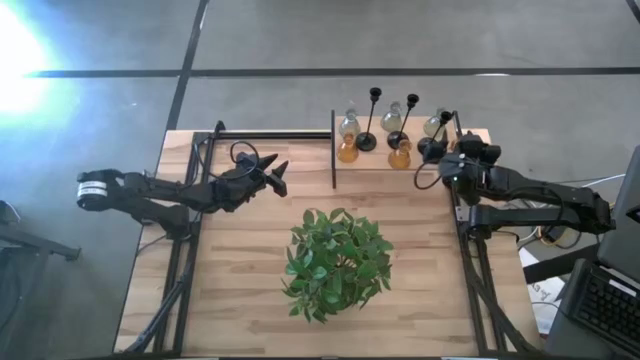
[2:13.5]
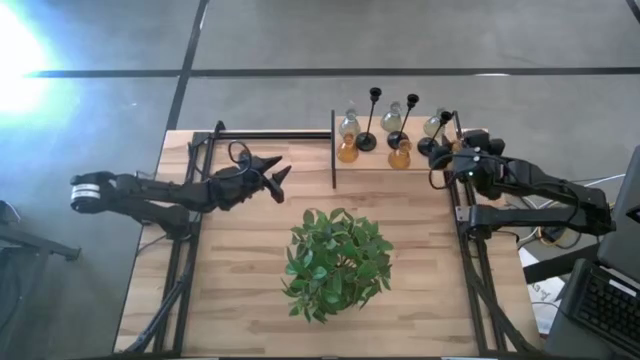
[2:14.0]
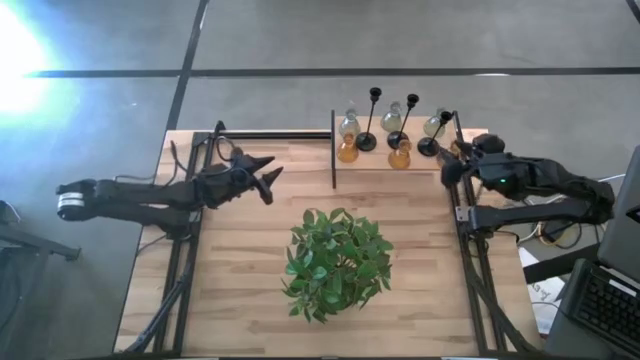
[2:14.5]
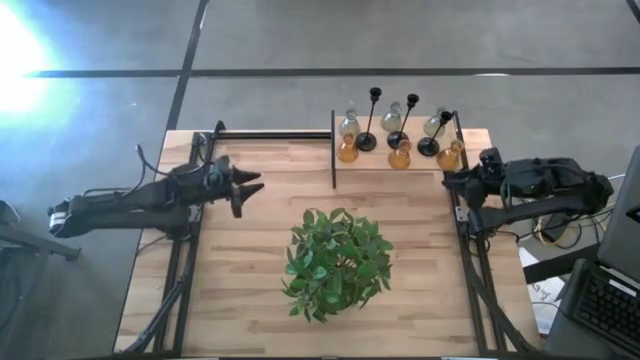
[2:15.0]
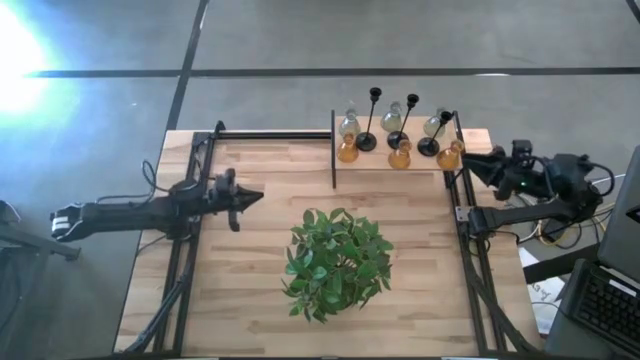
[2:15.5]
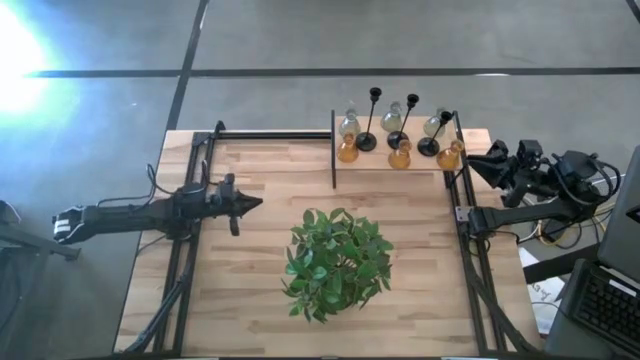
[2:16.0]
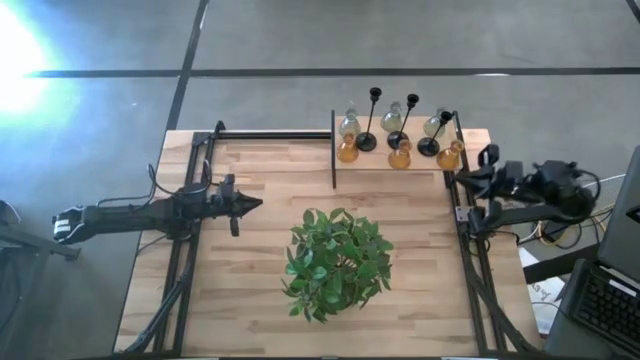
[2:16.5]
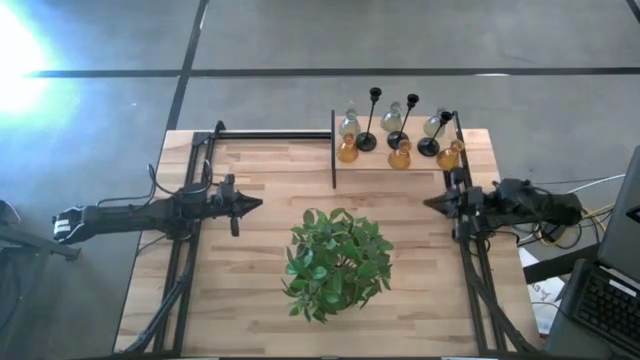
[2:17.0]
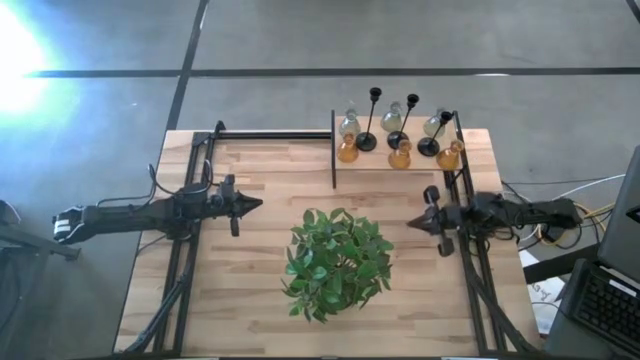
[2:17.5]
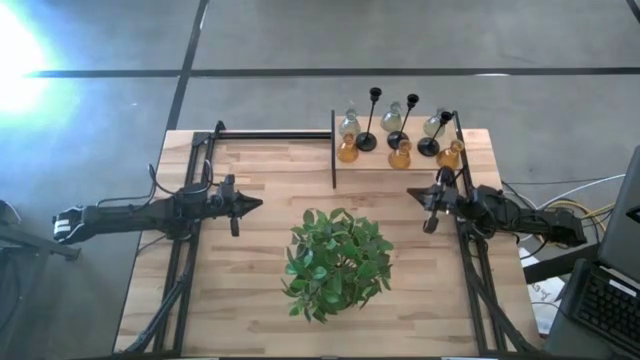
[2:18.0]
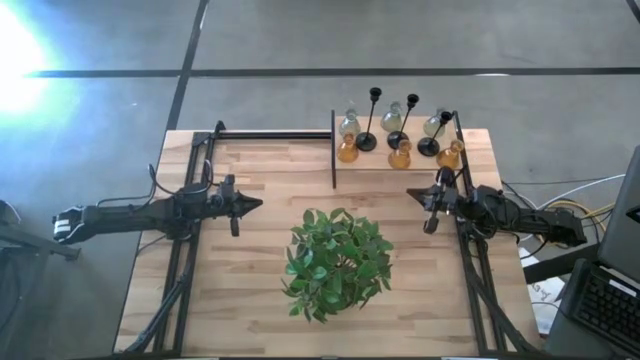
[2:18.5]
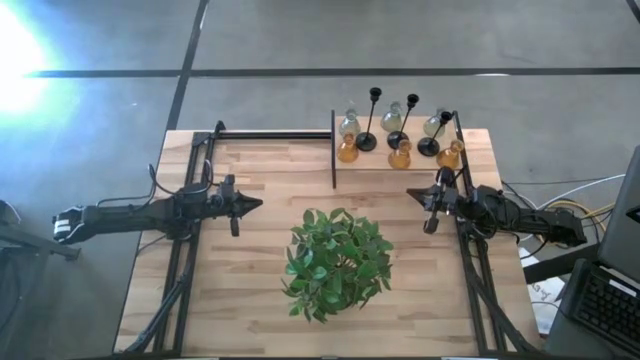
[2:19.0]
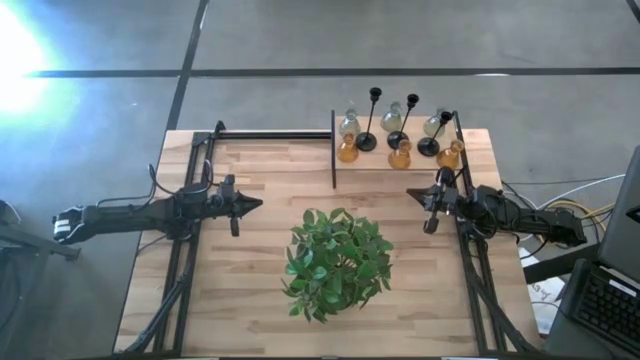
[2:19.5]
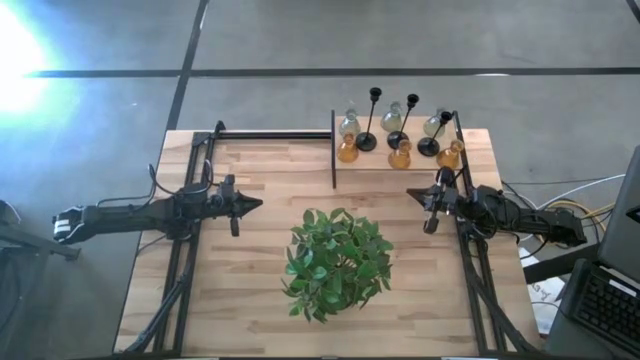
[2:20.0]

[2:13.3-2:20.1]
Task: Pick & Place candle stick holders
Return to Home Position

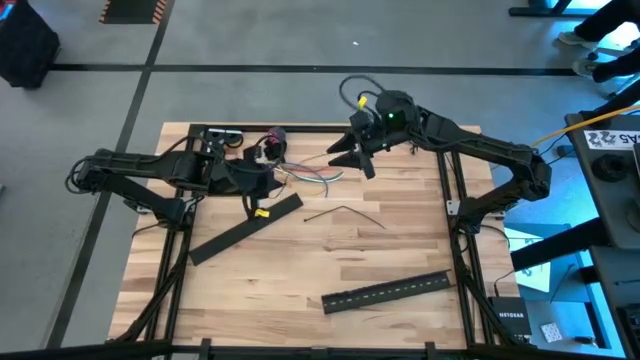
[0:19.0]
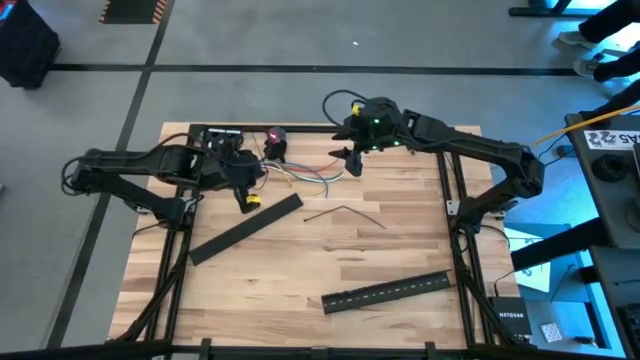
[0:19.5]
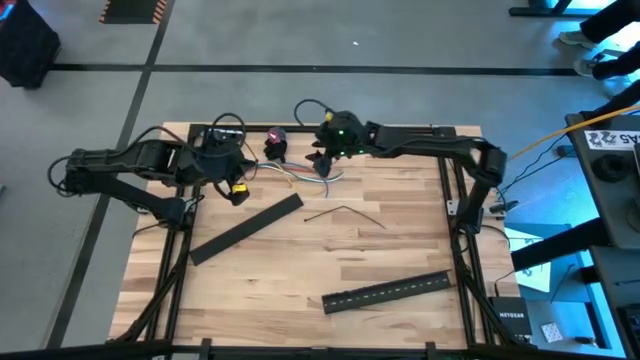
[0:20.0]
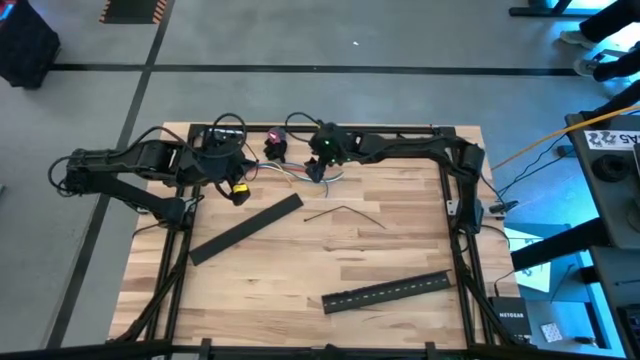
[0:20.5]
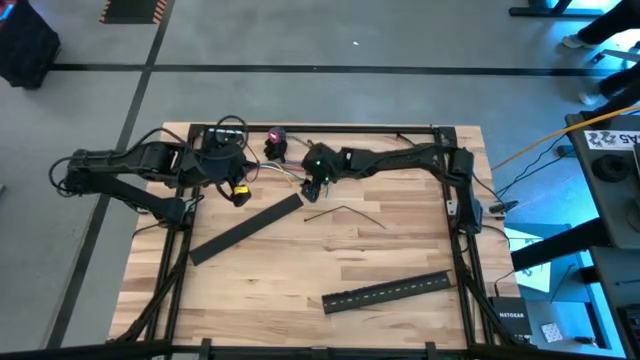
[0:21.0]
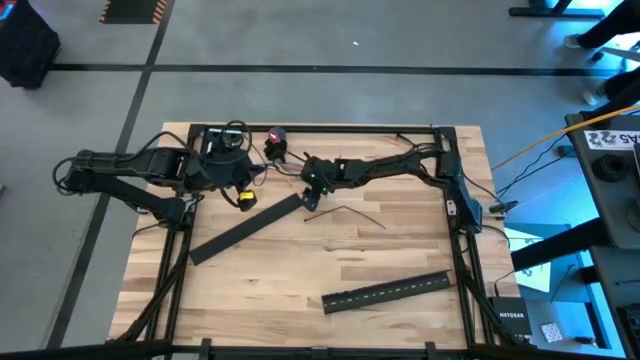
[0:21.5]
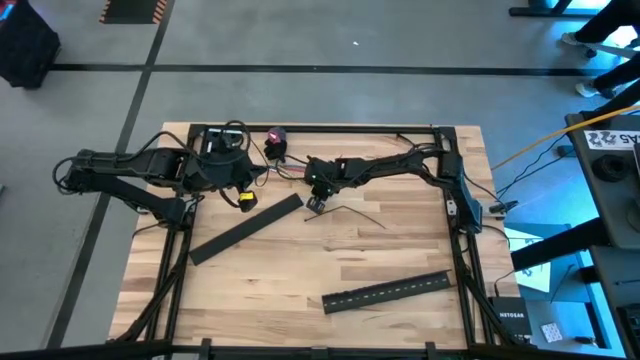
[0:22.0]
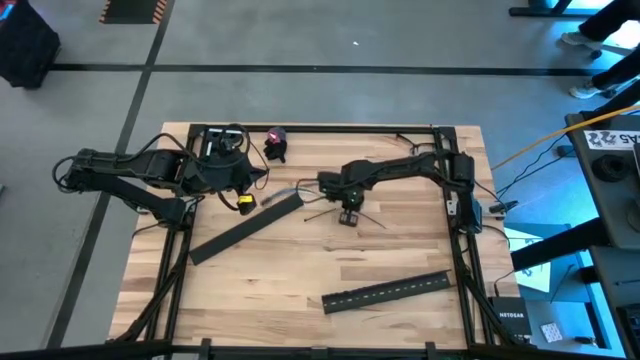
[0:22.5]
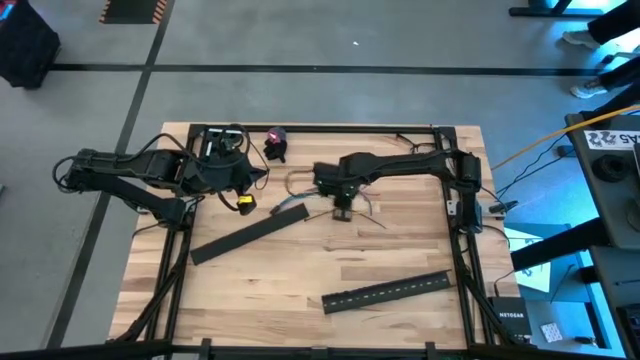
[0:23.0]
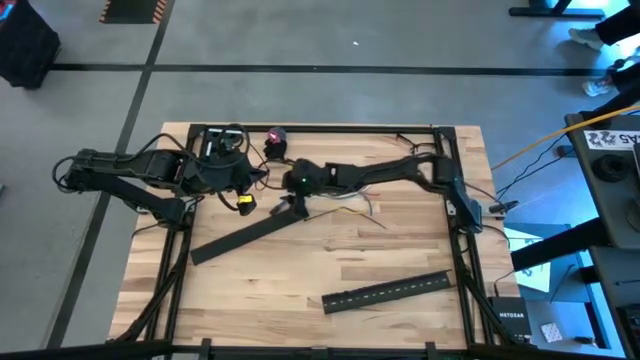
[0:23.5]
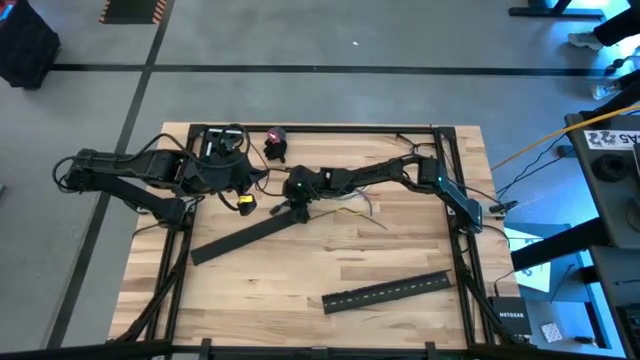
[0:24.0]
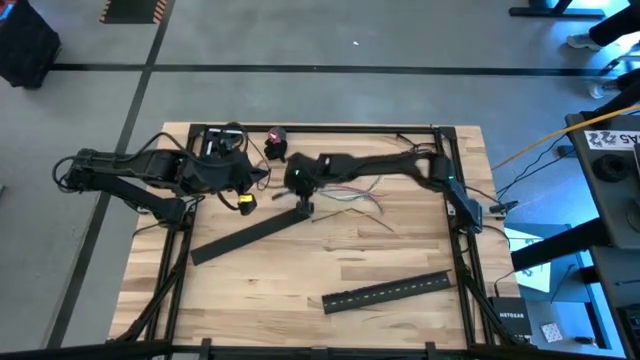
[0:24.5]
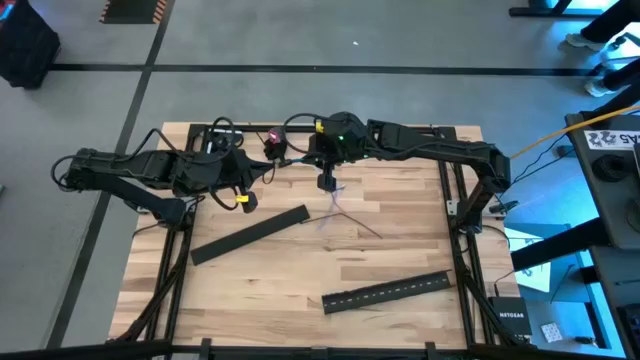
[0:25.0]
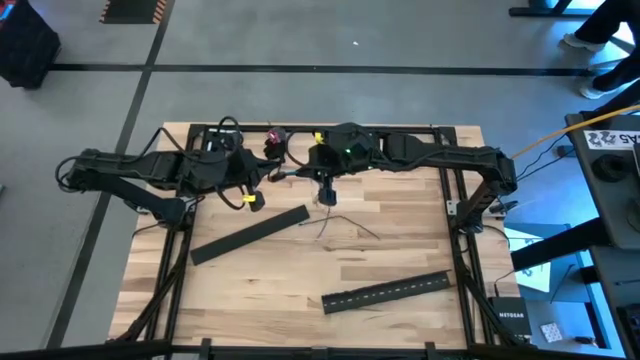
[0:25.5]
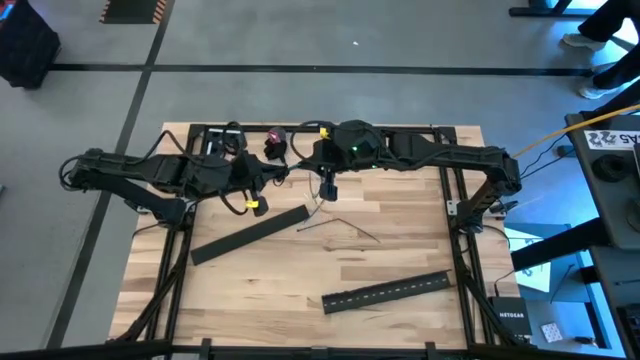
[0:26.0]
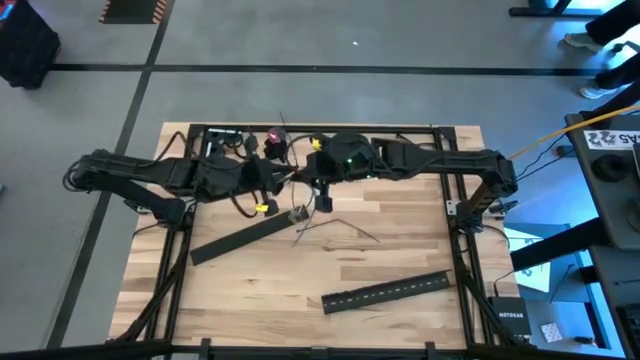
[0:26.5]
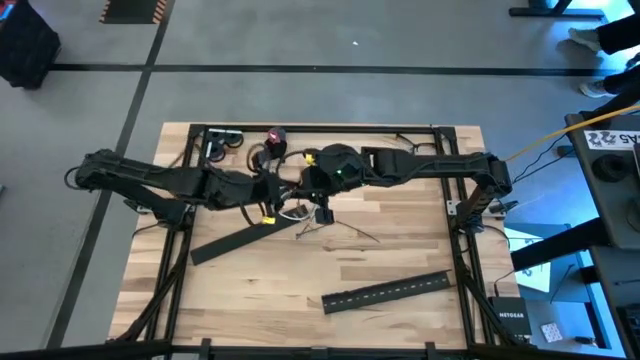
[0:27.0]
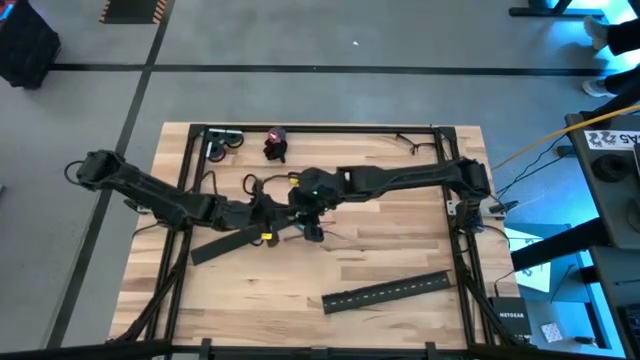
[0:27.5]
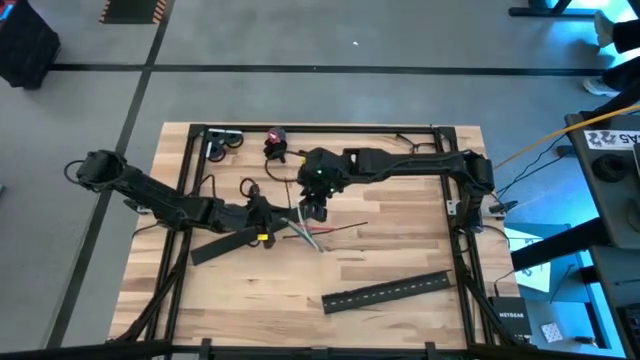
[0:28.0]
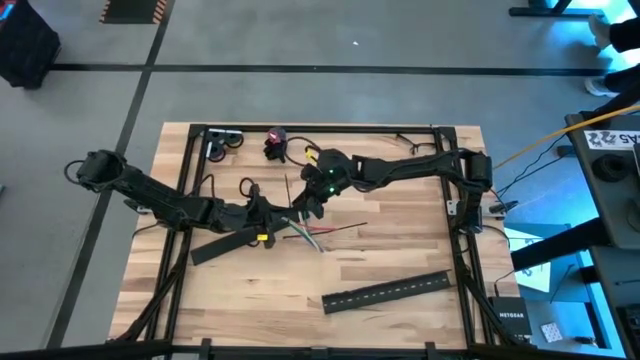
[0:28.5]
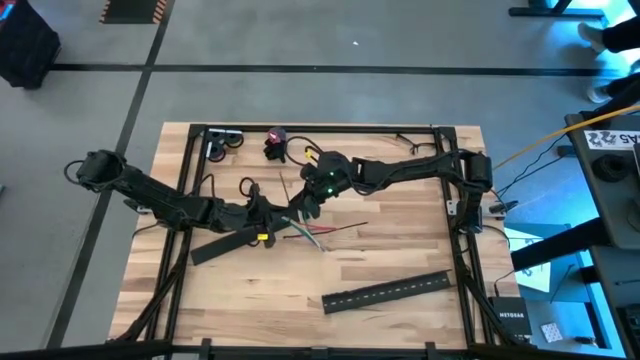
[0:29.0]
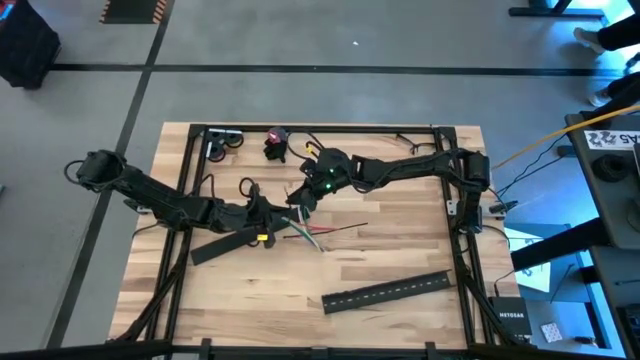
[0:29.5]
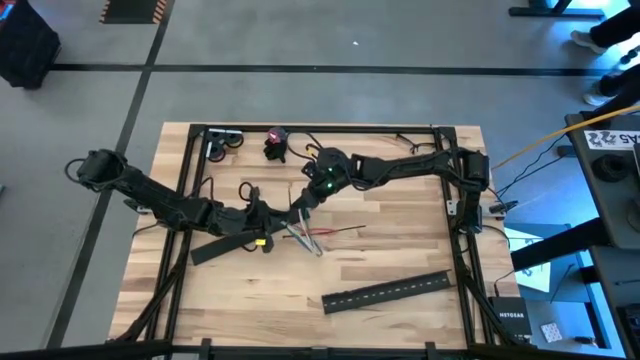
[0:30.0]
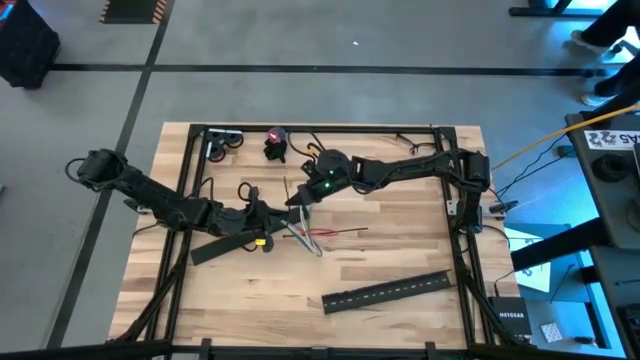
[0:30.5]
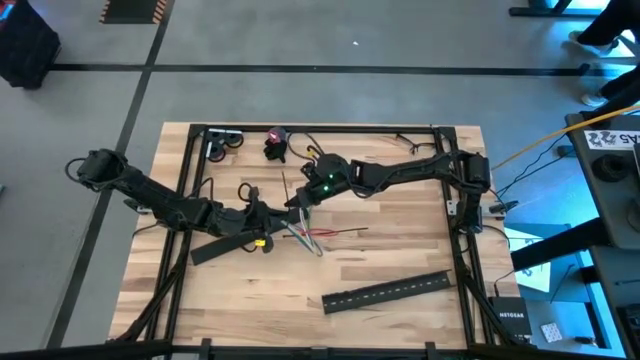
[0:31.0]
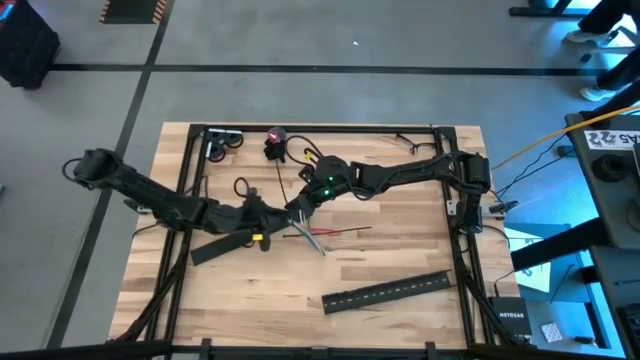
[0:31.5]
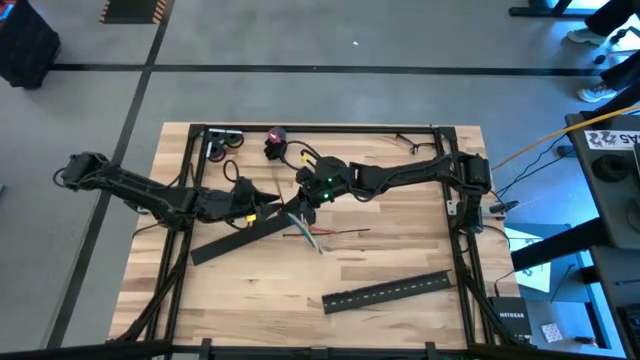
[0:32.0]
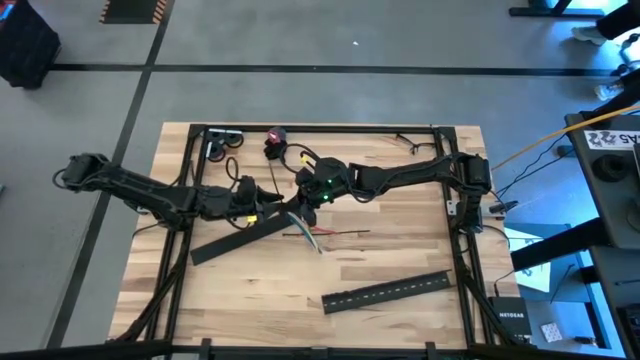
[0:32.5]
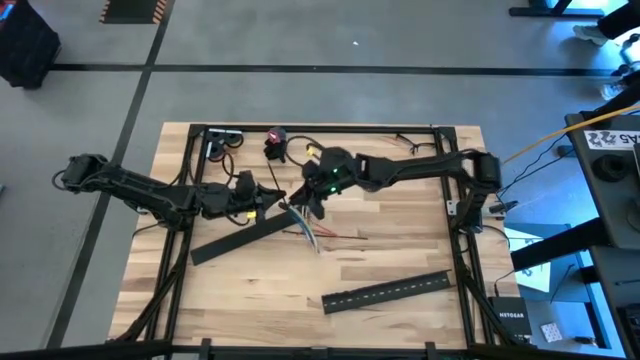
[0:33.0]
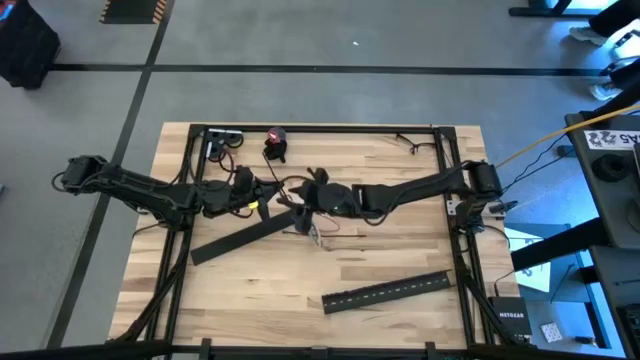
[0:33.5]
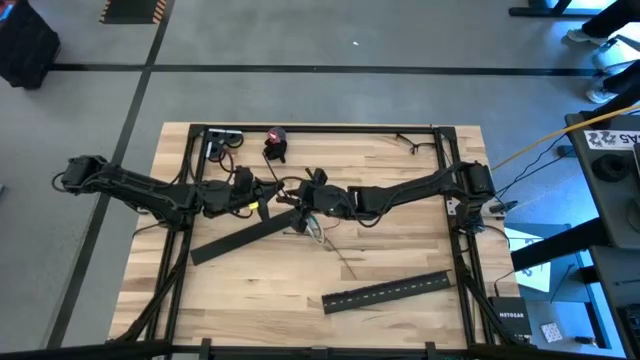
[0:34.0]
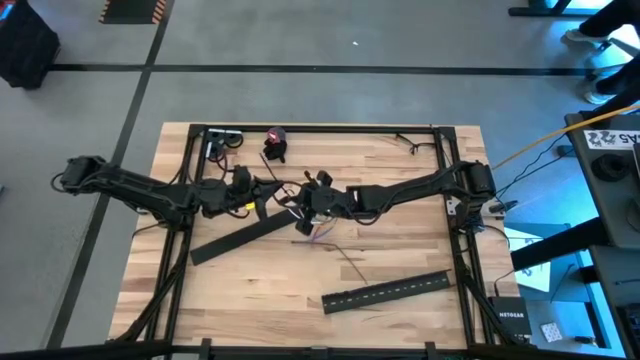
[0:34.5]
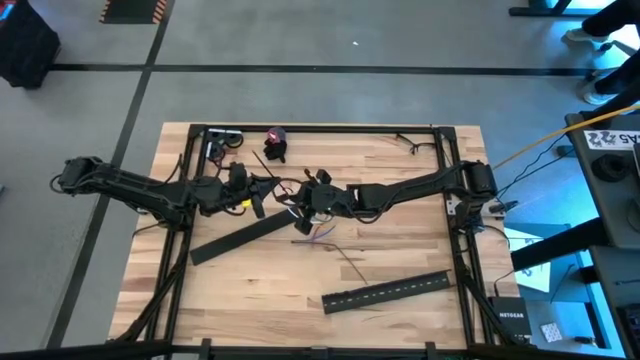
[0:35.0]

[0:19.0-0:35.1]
Task: Ziptie cables
Wrap the cable wires with the black zip tie
